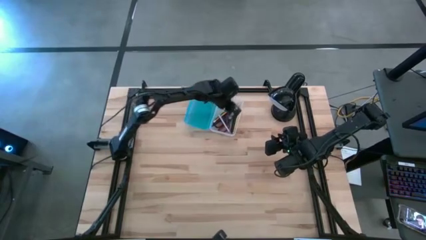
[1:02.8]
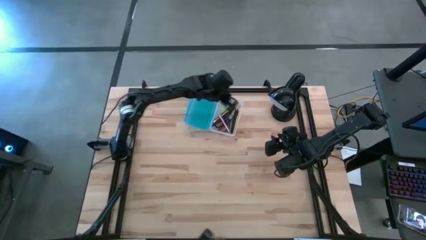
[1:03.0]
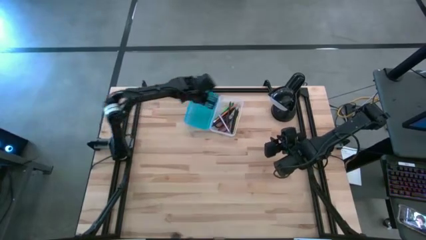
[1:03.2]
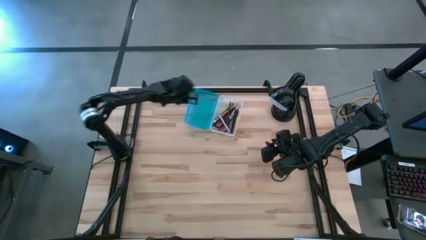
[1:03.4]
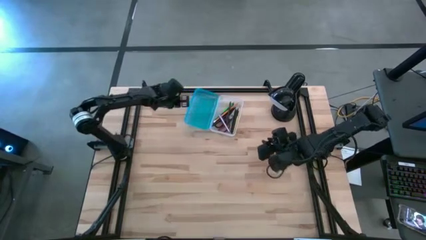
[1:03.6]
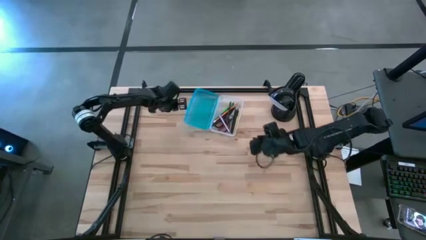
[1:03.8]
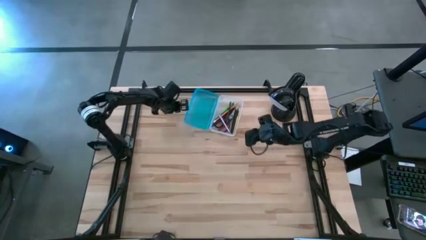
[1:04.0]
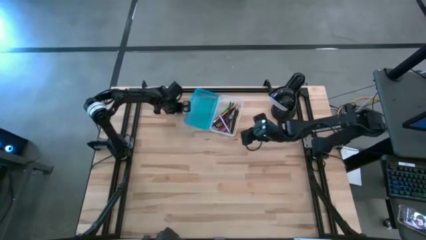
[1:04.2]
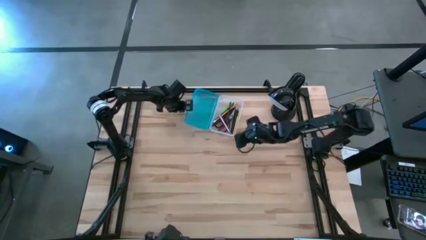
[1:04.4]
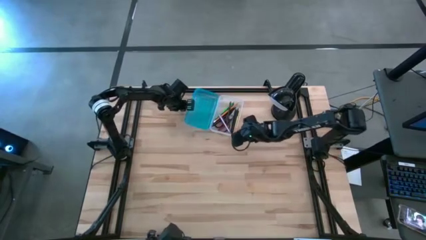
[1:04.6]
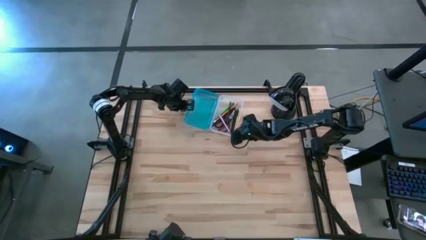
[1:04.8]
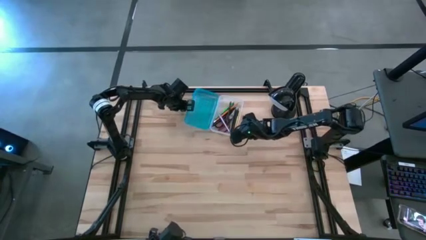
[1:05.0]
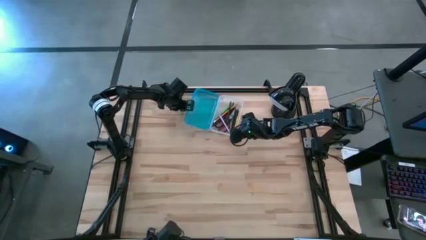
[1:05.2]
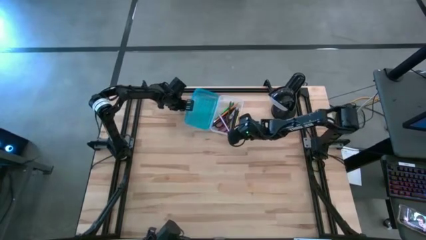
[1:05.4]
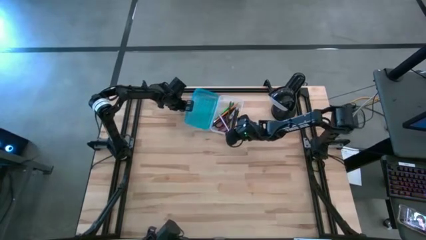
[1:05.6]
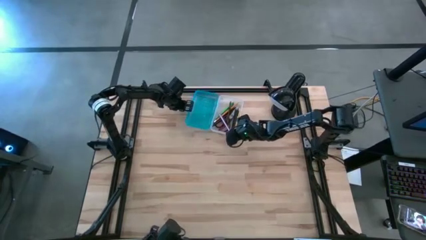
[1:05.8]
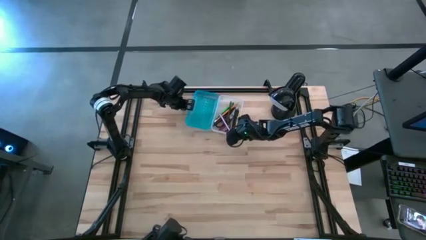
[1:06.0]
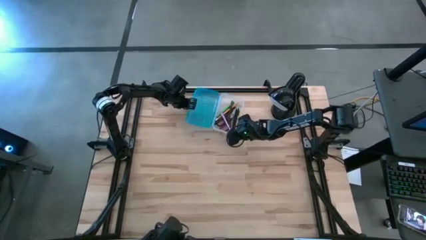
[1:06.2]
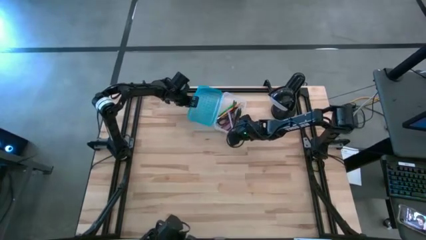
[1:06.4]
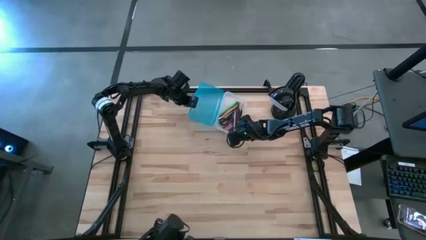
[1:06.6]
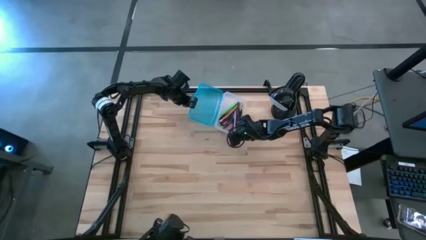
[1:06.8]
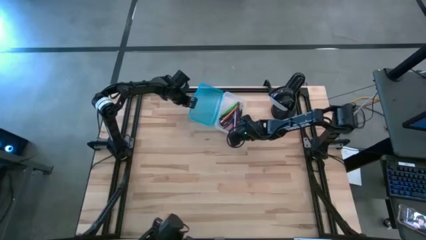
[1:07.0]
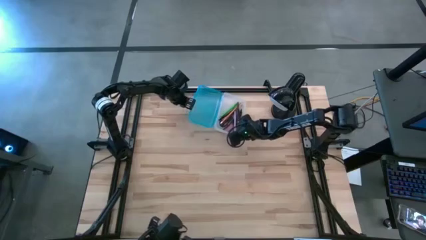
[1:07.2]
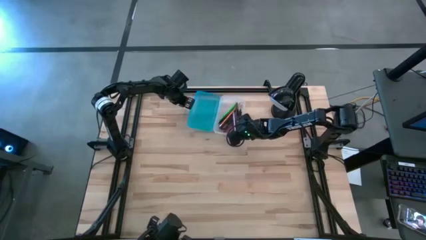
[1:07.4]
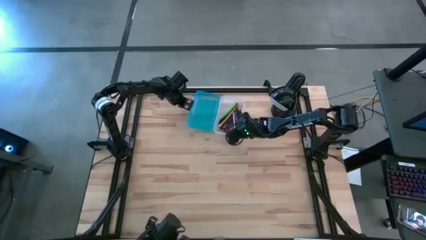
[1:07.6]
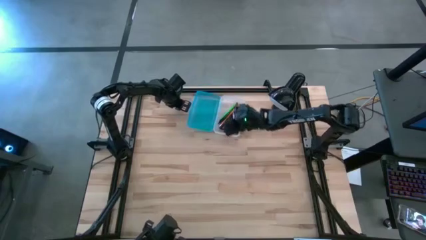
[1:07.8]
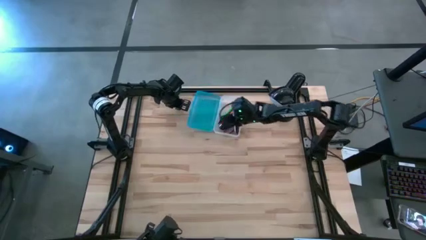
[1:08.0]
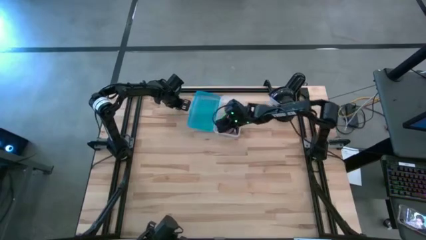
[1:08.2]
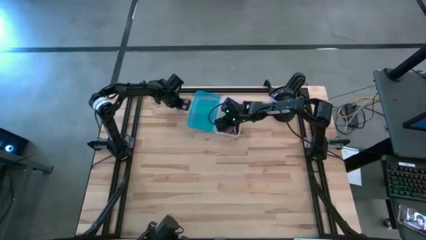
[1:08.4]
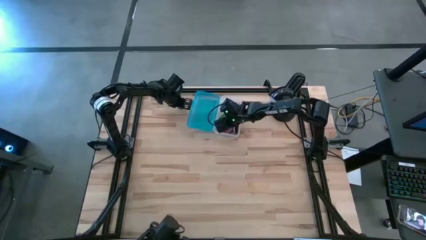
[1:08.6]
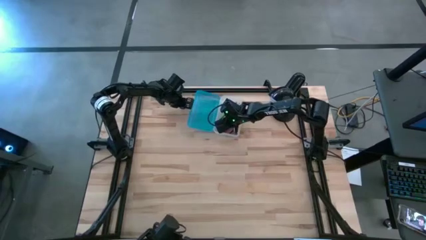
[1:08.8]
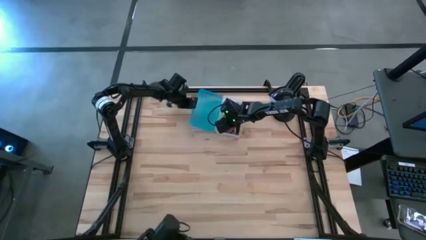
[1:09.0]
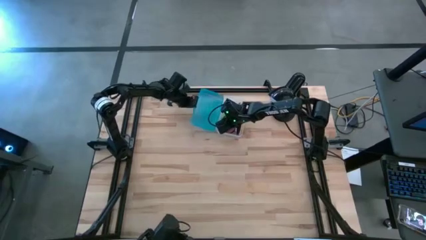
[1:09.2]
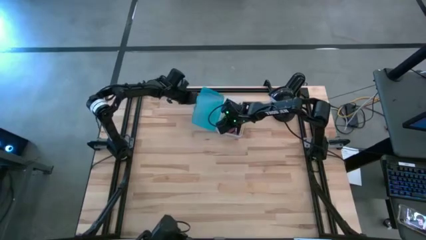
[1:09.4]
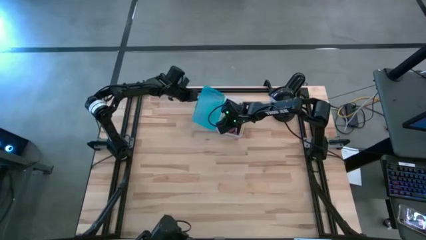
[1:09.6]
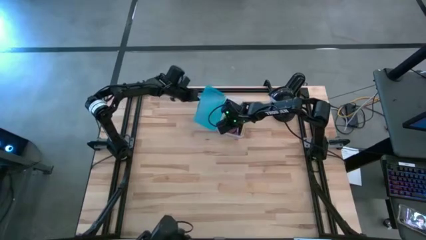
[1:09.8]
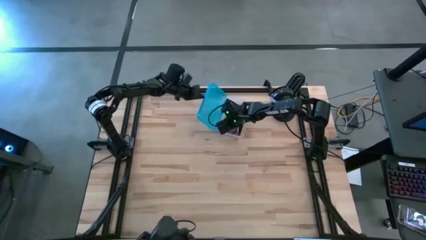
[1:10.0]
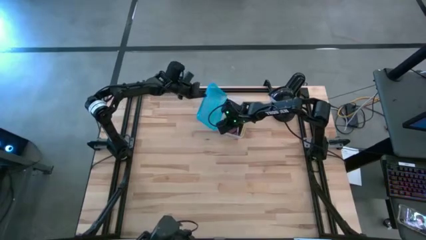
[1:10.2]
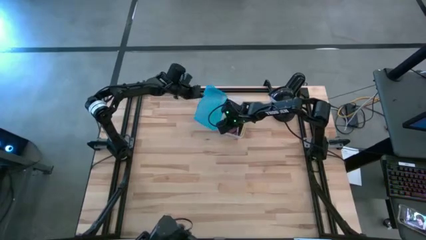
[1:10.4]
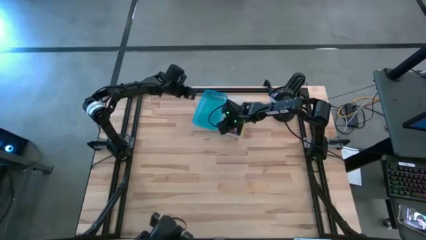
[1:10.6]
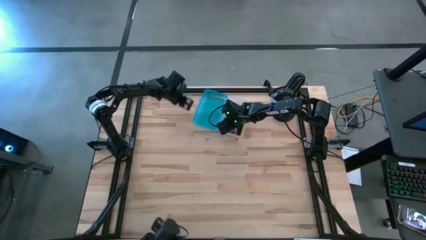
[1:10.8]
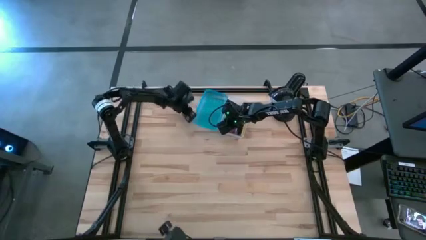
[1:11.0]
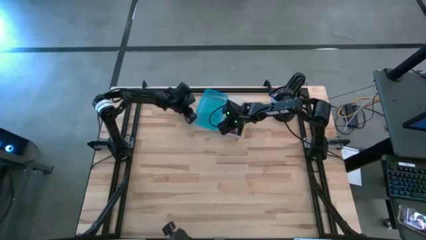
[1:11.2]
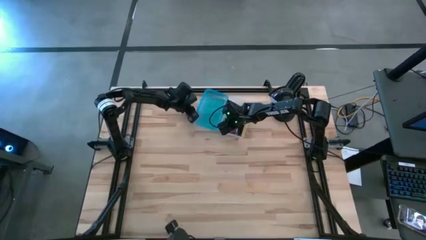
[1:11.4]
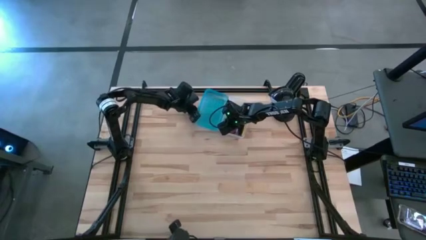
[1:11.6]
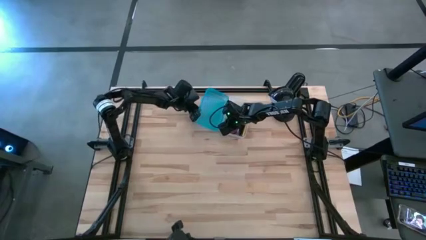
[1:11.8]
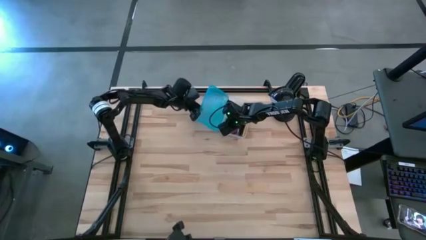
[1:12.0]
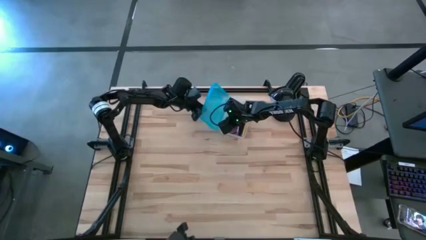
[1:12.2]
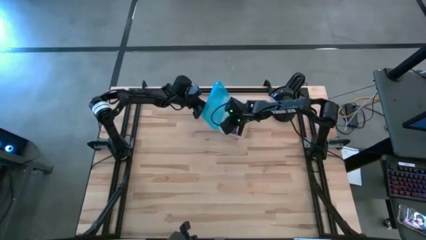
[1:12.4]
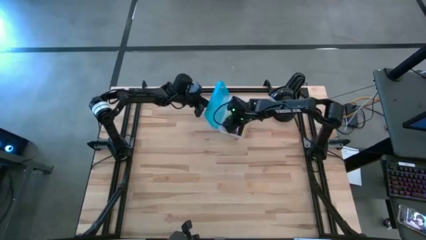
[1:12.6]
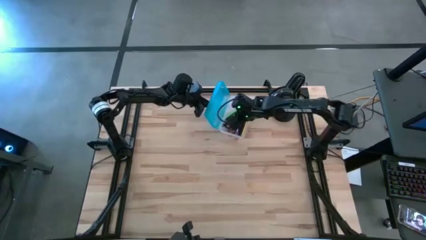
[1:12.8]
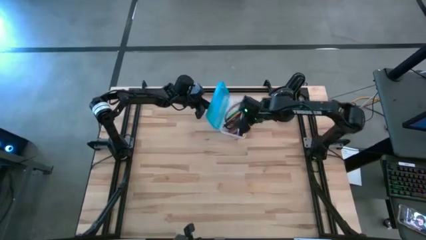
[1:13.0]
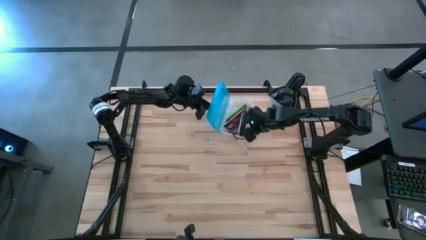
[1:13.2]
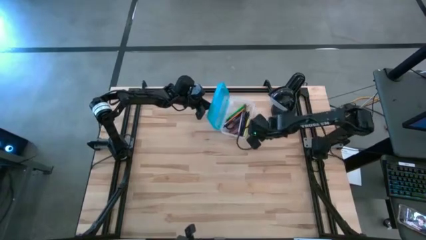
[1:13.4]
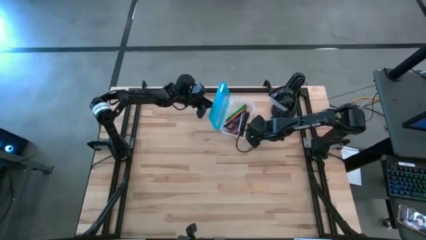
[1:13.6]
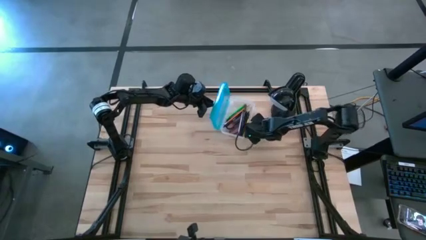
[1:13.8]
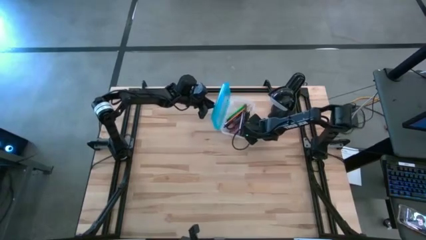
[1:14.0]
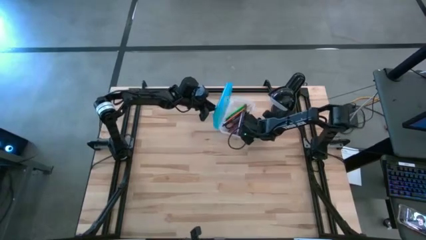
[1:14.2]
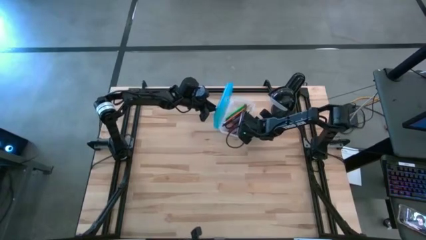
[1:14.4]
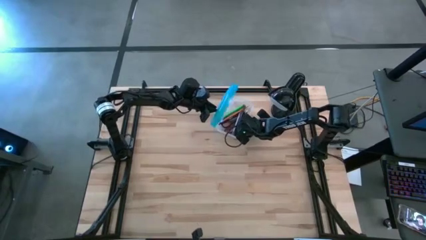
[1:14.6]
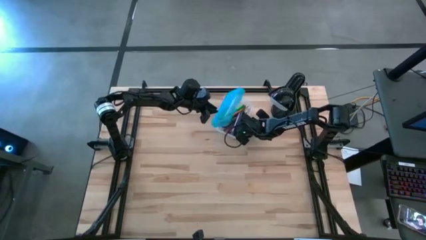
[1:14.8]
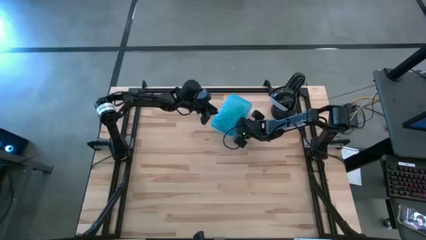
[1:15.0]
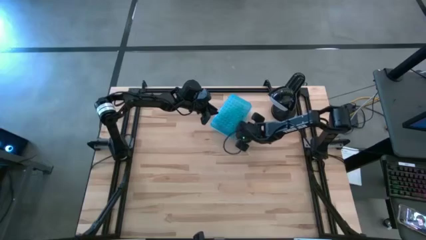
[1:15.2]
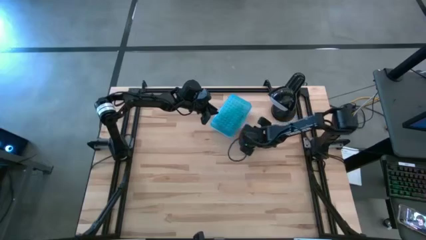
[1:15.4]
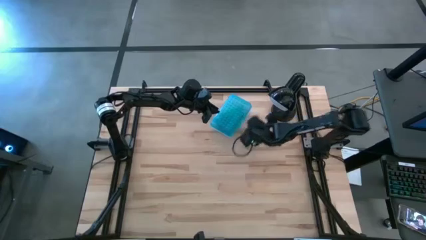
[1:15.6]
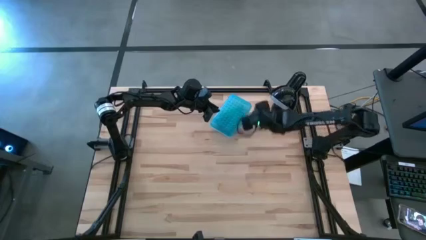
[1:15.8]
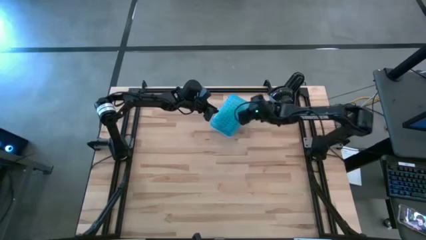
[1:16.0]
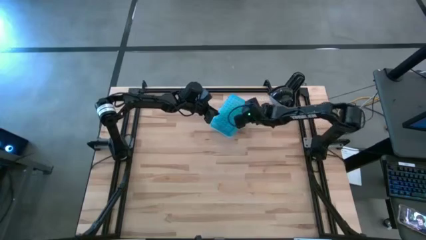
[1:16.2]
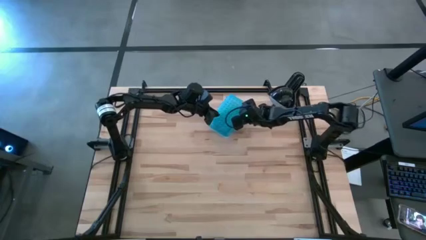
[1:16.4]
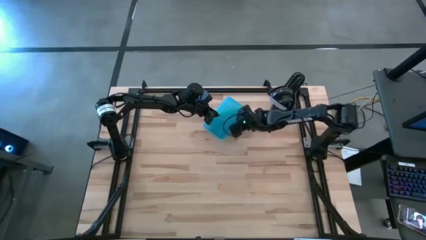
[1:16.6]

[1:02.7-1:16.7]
Task: Pick & place school supplies into a supply box
Close the blue supply box
